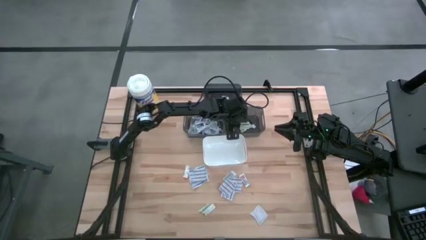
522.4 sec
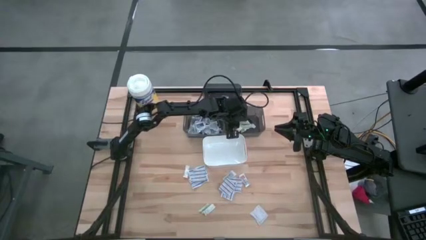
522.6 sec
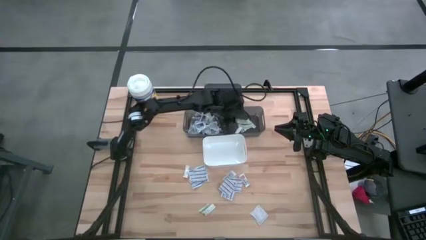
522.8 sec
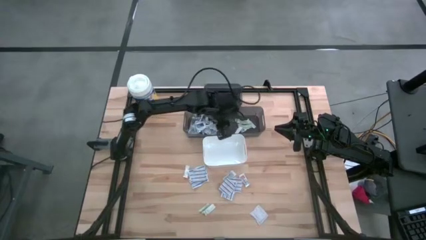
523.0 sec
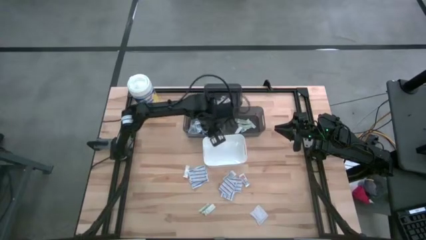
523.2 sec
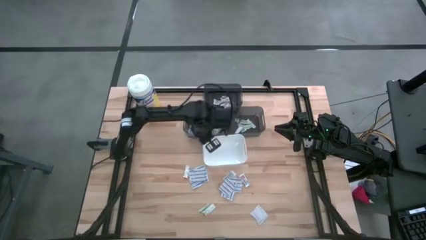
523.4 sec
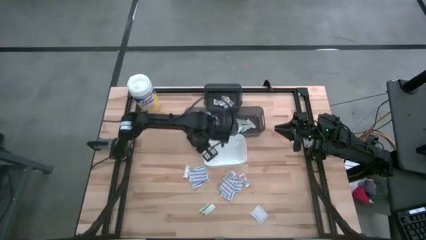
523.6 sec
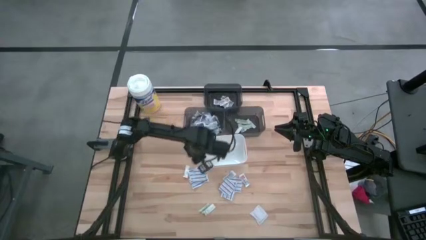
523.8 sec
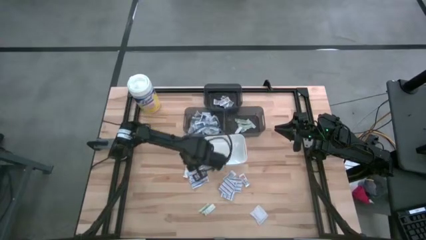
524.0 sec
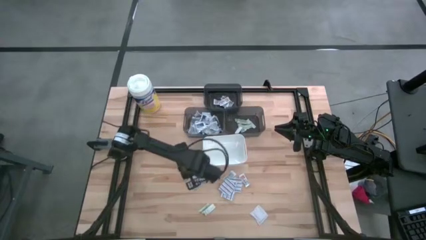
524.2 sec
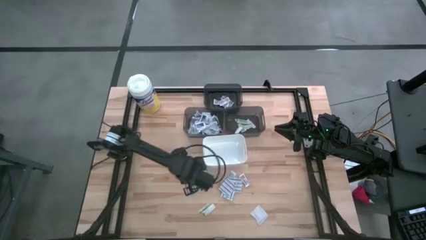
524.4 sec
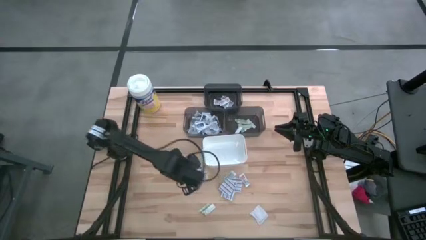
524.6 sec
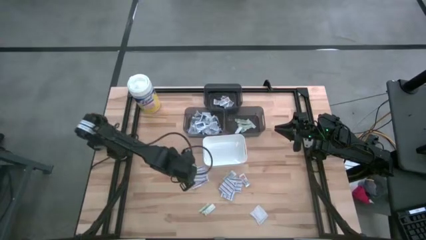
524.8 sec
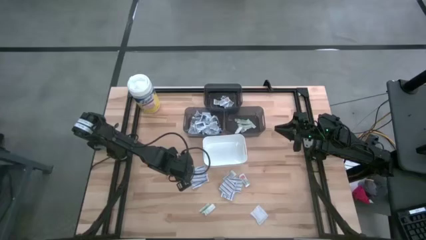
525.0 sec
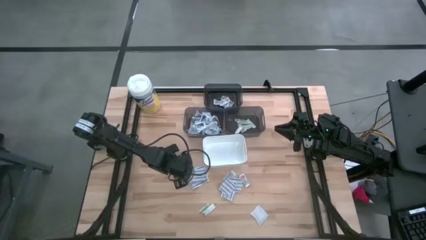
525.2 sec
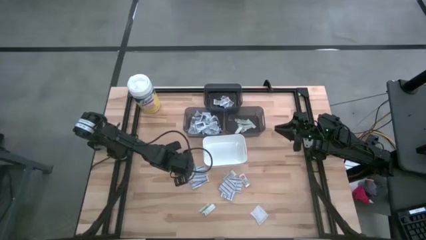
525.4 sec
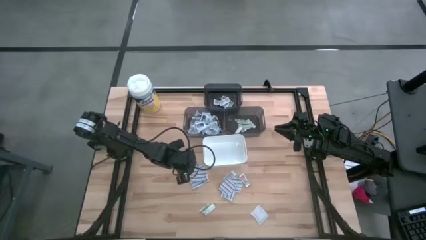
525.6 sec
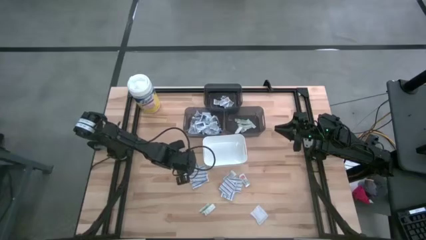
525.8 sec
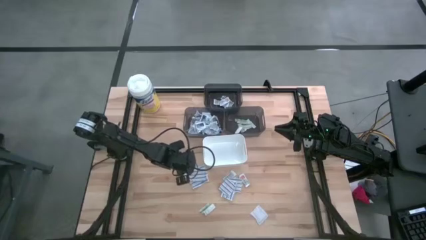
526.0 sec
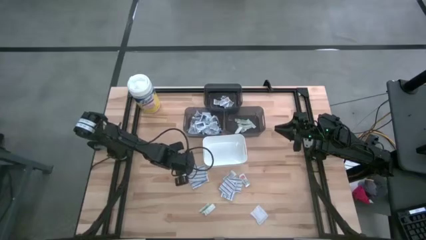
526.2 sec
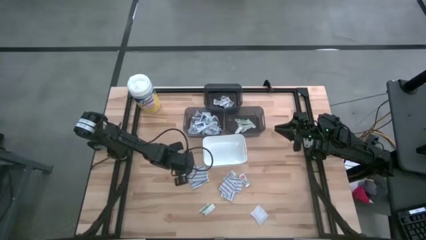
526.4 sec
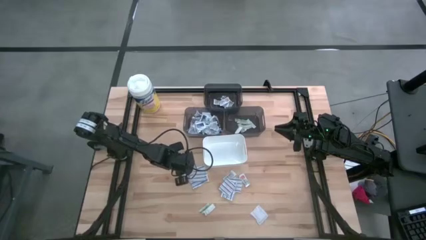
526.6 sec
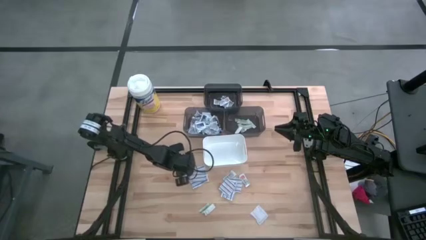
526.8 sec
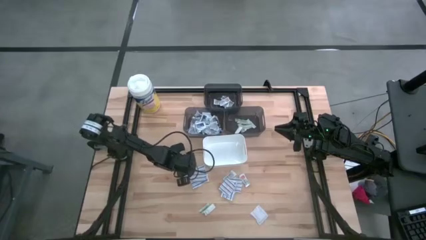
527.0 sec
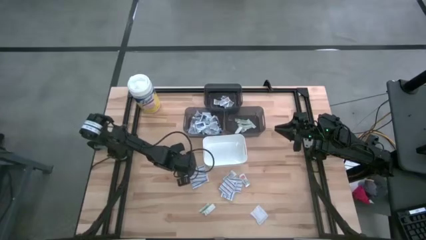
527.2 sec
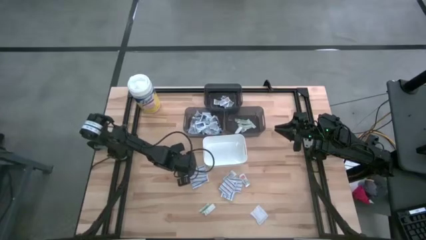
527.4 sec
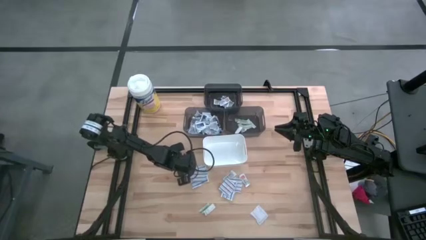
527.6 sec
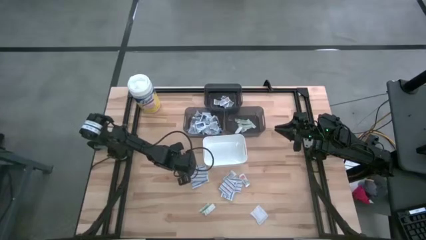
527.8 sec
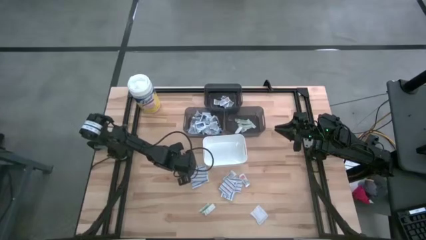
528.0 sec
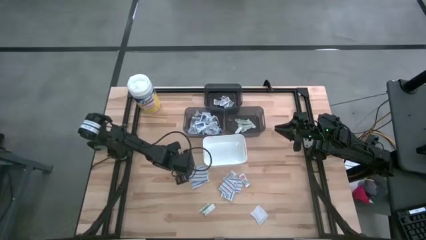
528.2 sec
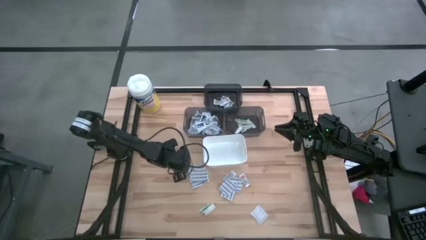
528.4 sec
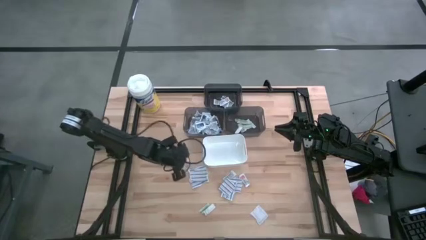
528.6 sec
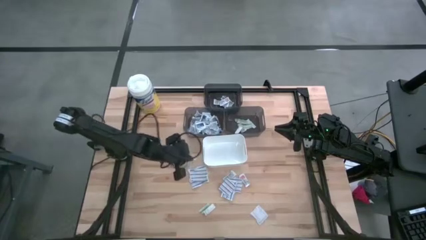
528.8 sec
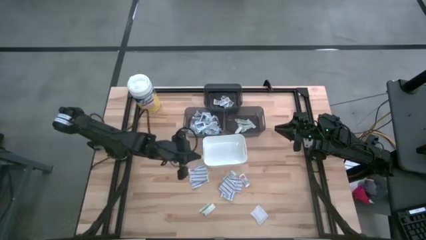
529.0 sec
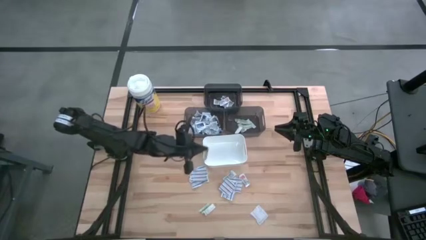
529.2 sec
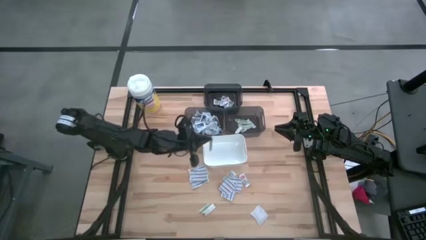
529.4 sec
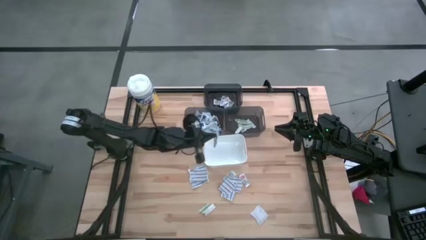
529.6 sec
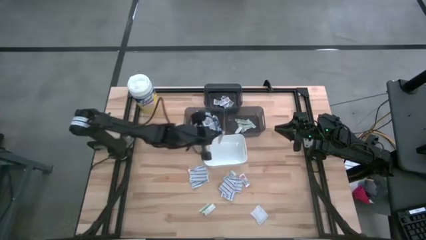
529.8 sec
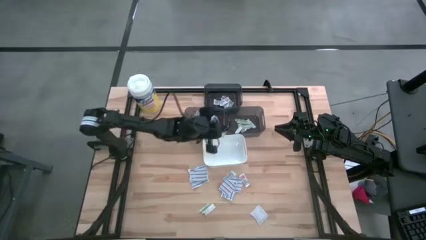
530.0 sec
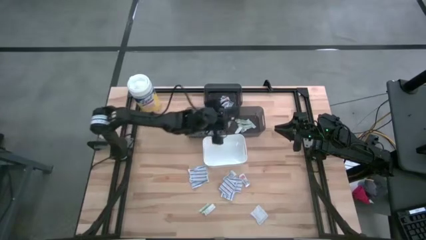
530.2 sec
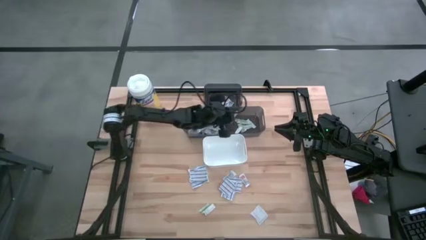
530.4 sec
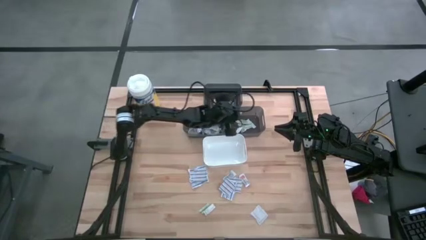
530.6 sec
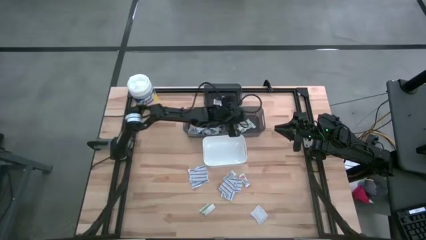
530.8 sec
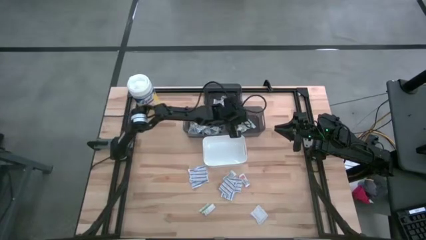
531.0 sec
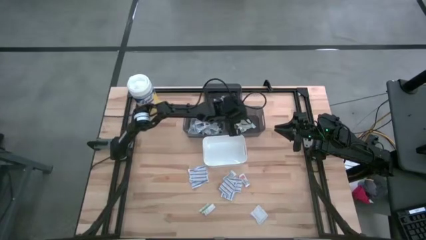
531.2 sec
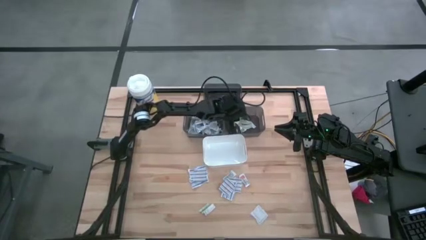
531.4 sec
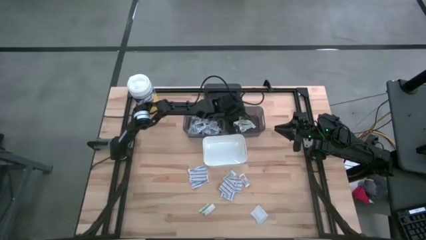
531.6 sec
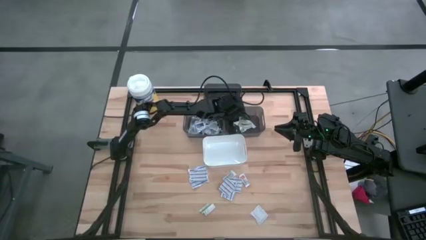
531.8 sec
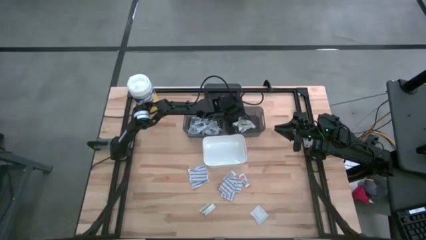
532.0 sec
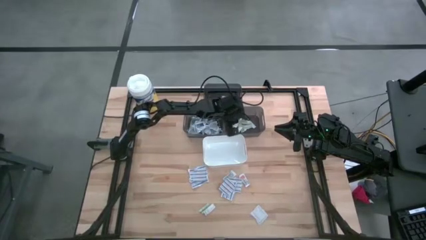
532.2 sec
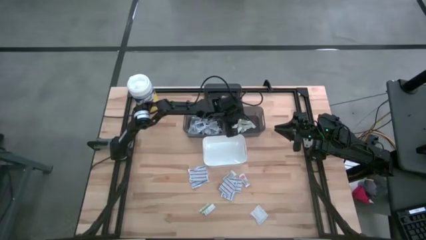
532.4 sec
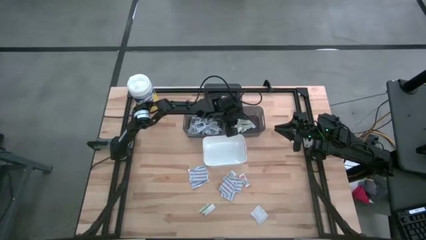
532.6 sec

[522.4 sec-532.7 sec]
Task: Pick & Place First Aid Supplies
Put the green bandage into the bottom right black bin

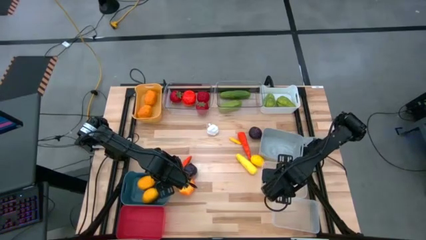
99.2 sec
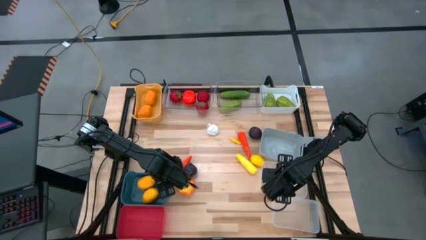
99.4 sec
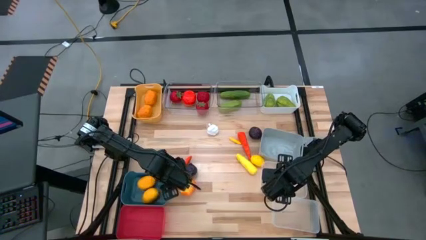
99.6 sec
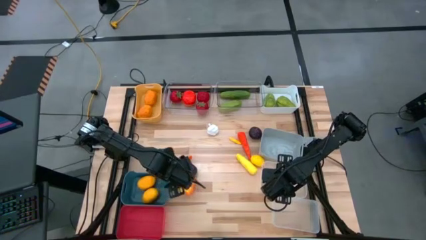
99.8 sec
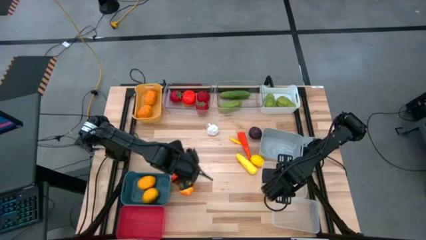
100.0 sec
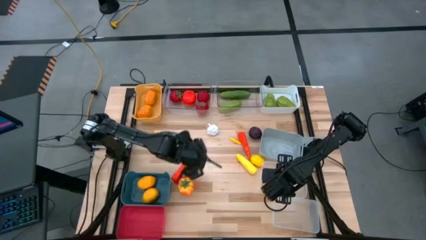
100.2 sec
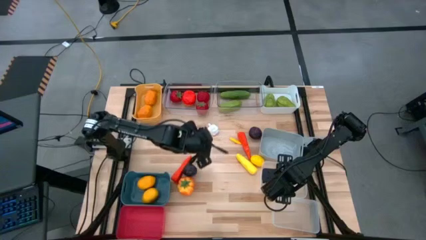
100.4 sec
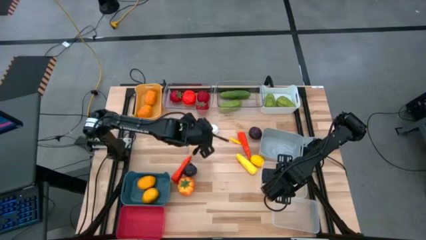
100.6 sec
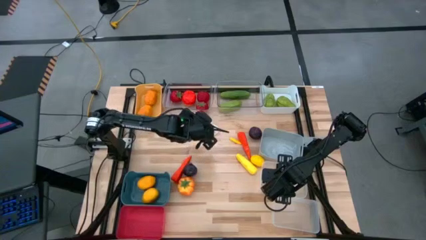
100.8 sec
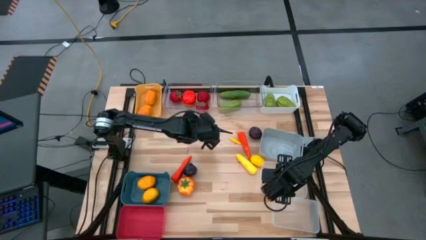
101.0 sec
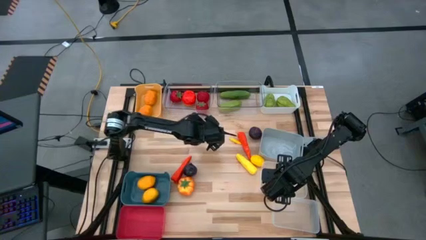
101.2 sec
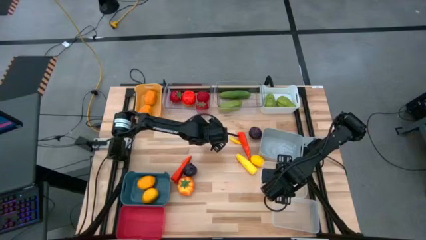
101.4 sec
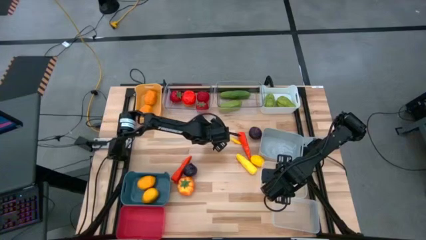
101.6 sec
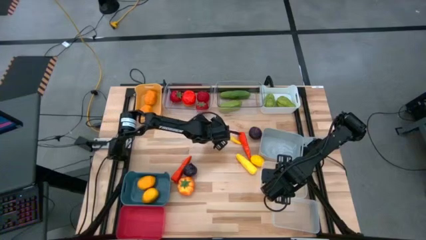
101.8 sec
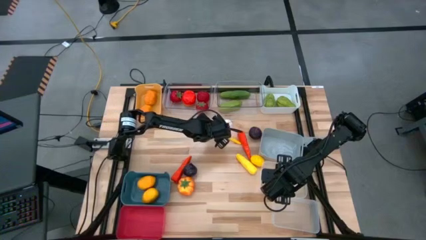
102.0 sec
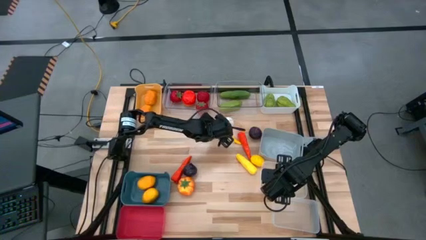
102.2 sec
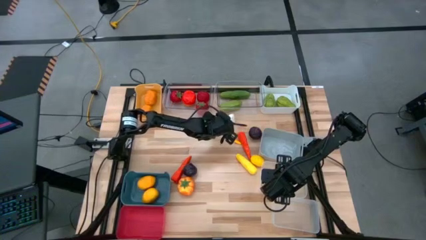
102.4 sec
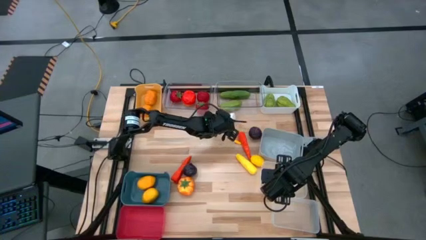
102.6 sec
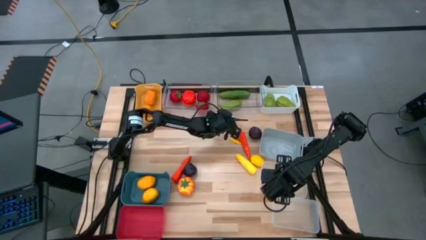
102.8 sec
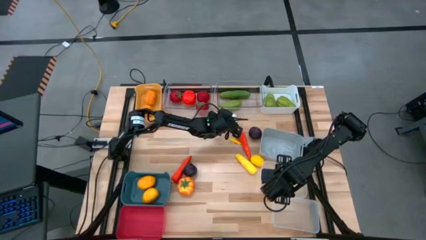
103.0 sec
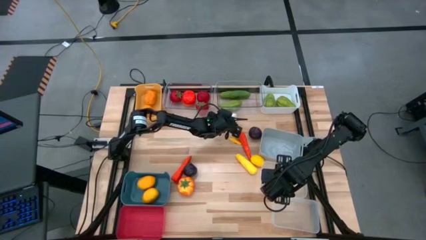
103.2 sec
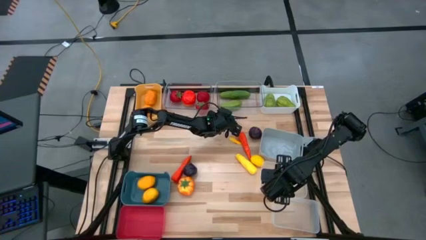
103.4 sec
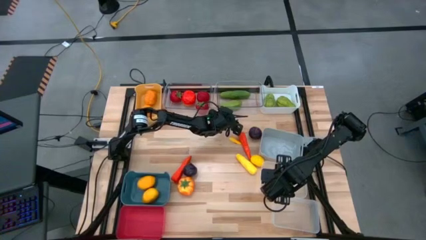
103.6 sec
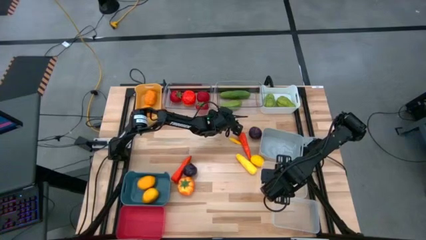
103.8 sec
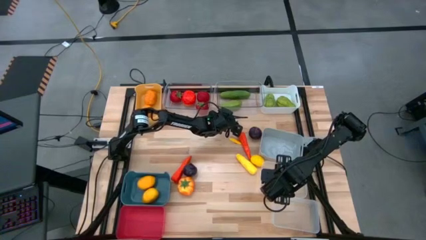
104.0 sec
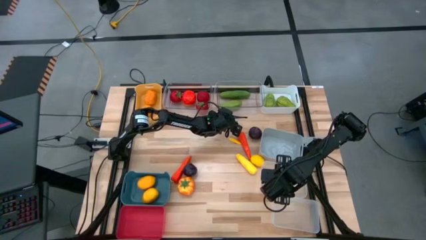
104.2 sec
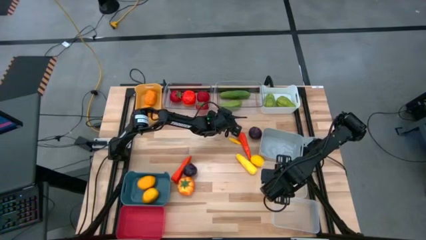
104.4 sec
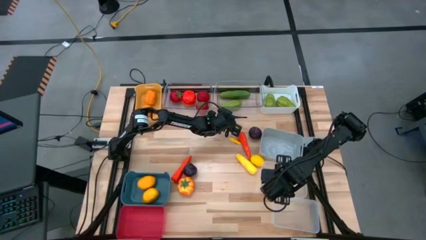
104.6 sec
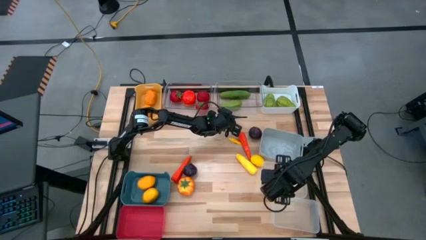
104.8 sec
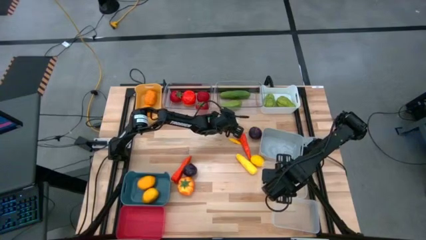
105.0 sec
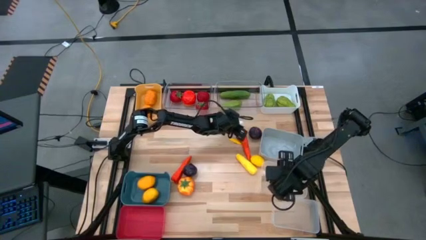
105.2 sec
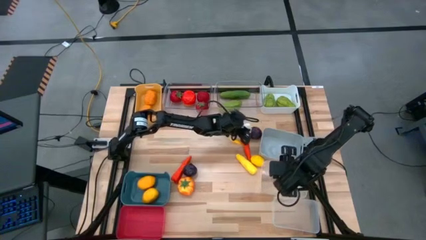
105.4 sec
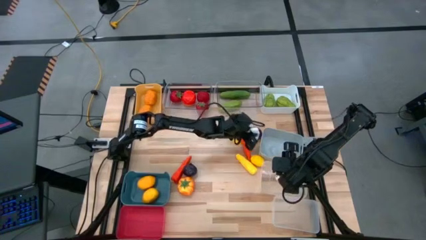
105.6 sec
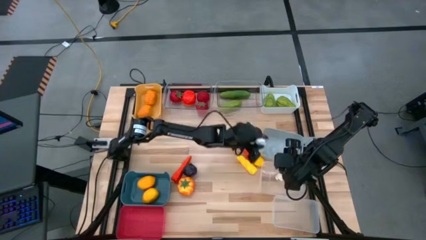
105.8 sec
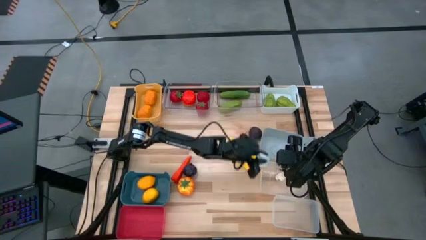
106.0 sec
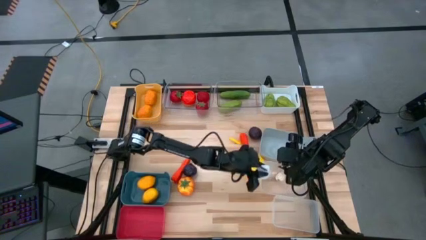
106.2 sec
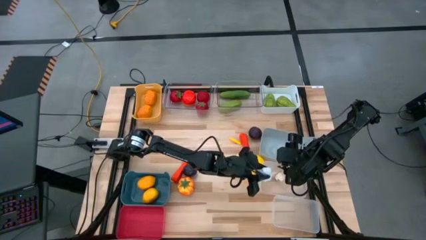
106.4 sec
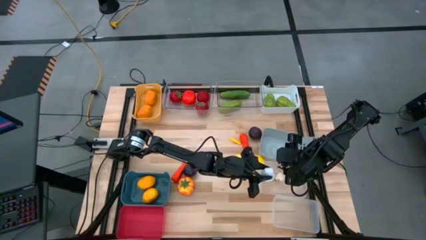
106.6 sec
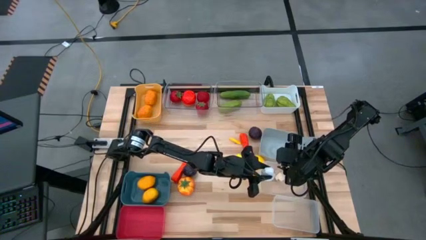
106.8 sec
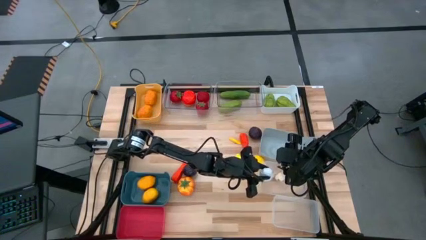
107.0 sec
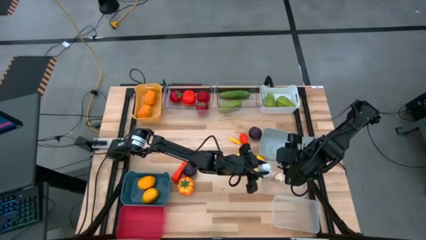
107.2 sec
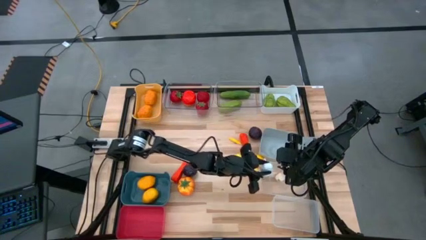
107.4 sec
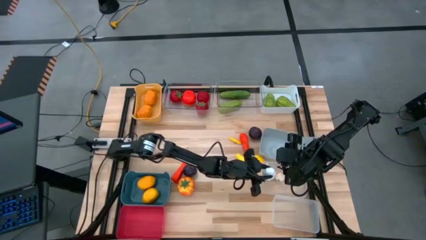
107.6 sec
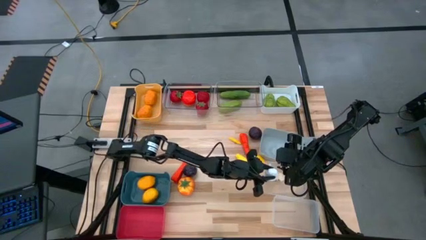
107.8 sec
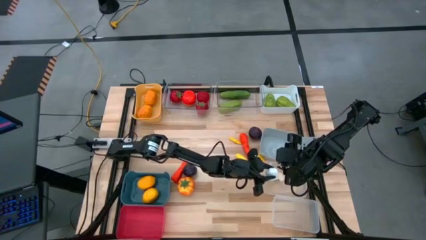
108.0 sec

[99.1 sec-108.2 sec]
Task: Sort produce into baskets
Put the garlic into the top white transparent bin
